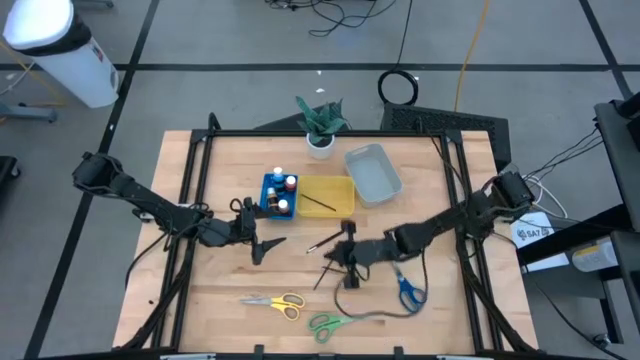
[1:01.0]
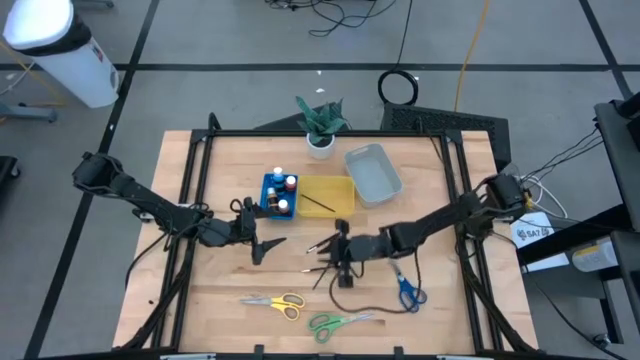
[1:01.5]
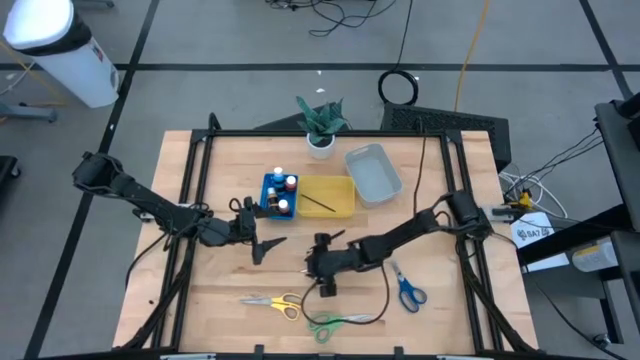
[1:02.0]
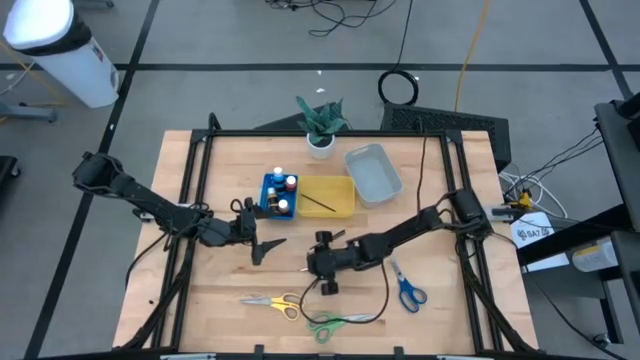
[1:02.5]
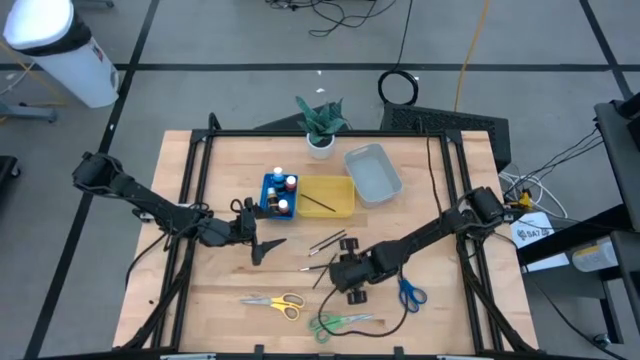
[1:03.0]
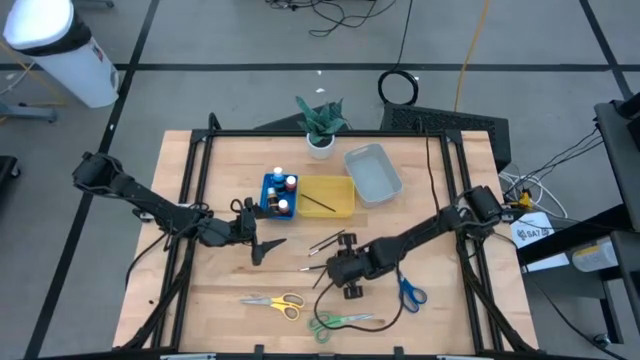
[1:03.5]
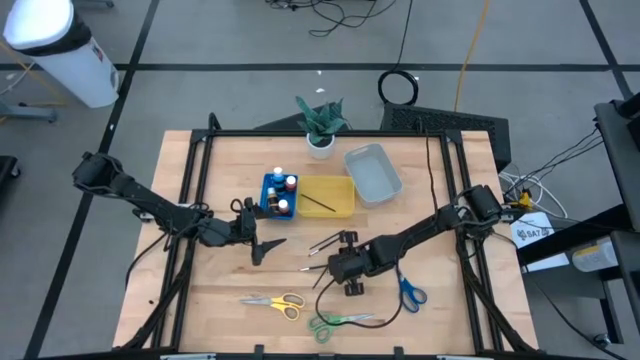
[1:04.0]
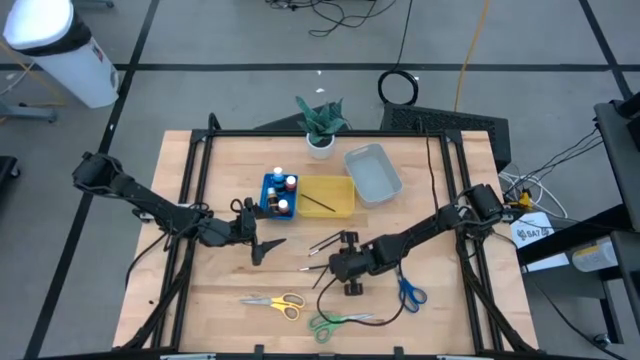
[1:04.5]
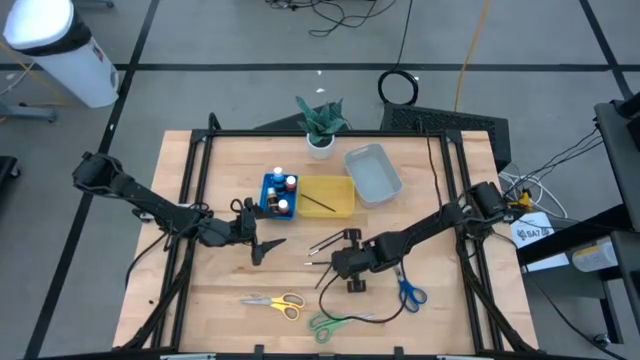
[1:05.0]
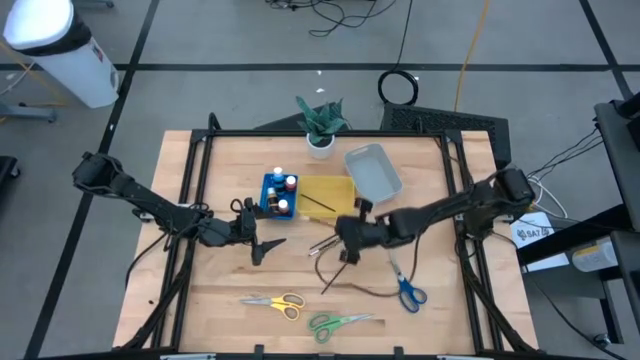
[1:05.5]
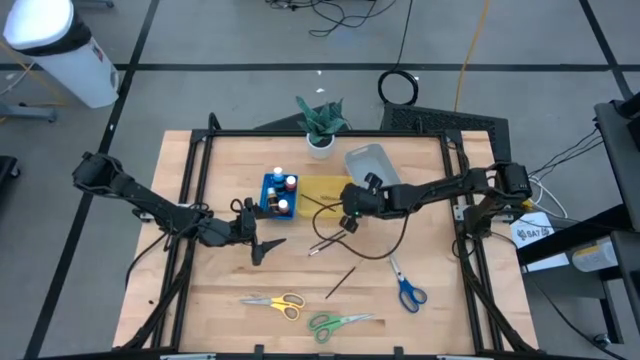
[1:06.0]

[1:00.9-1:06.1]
Task: Pick & Place Paint Supplies
Put the black makeup brush into the yellow bin

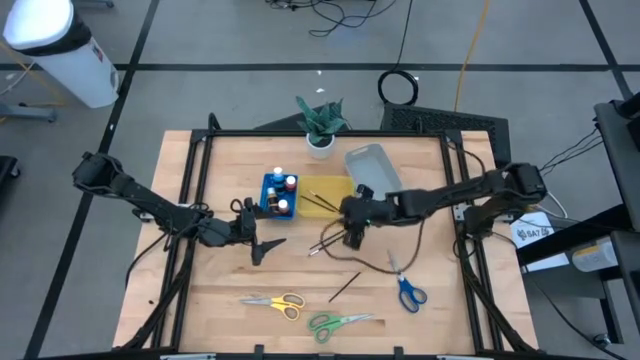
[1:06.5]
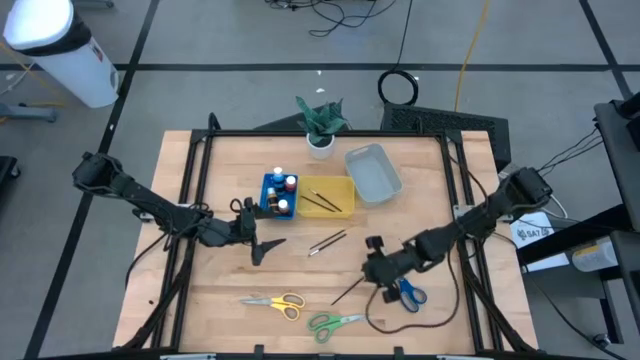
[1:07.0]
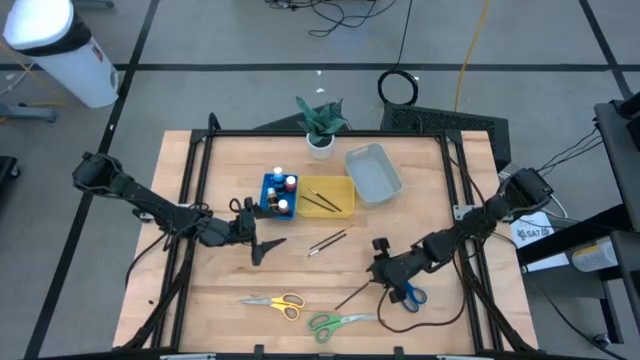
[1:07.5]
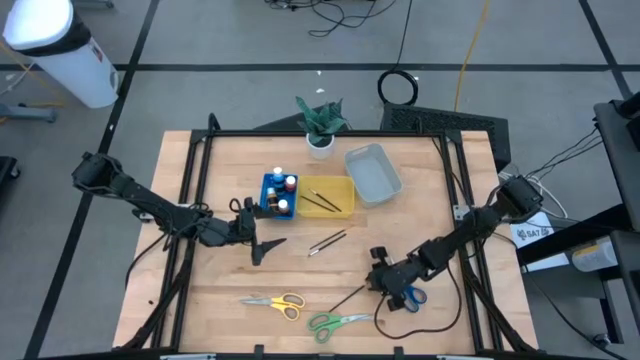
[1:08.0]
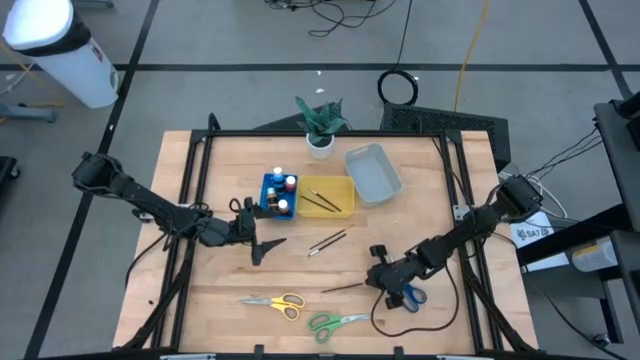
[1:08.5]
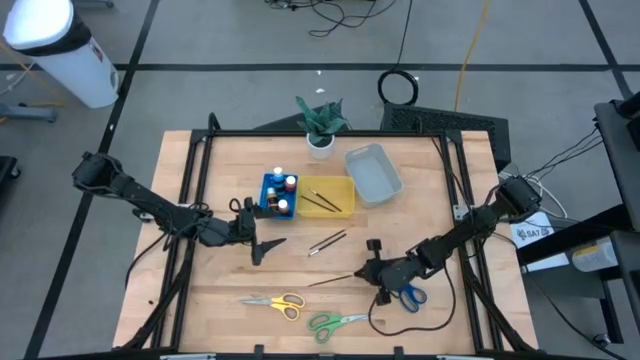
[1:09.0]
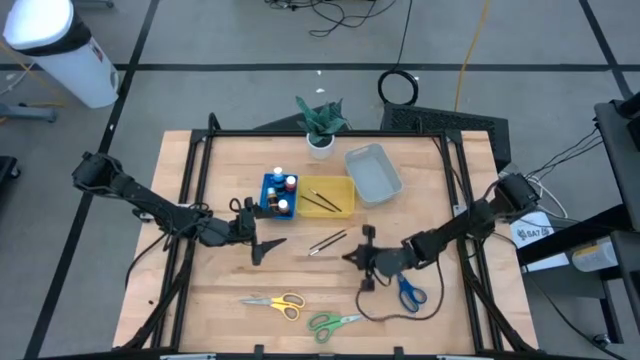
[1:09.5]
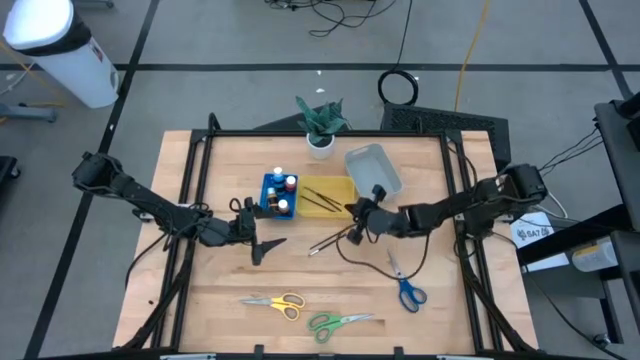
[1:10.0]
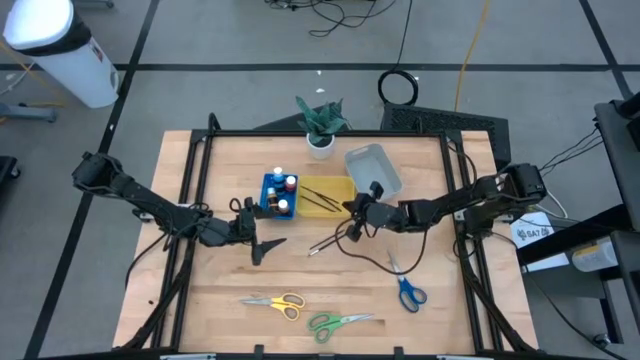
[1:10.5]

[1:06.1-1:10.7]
Put the bottom black paint brush into the yellow bin

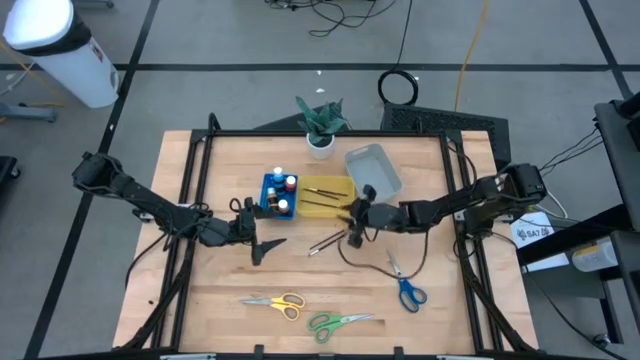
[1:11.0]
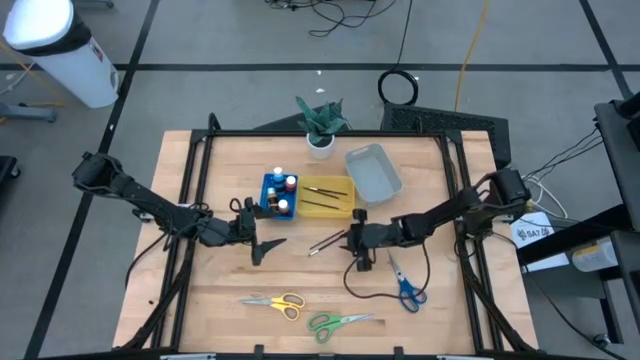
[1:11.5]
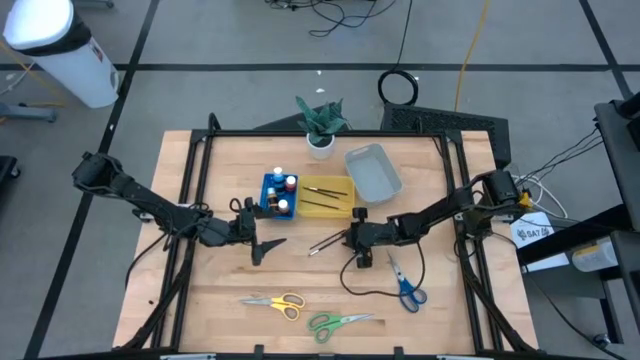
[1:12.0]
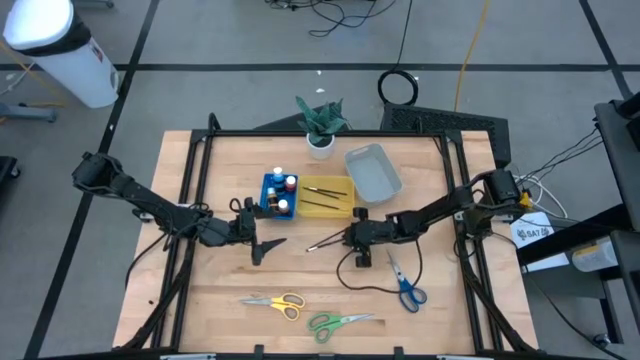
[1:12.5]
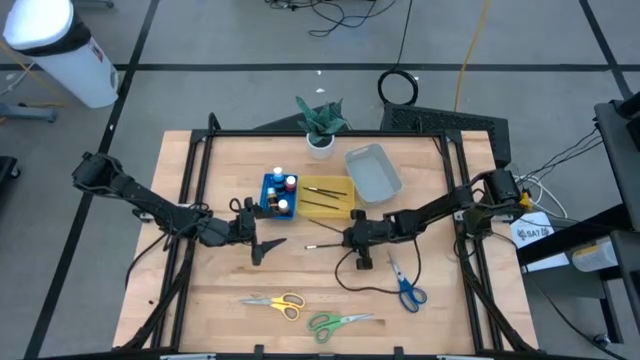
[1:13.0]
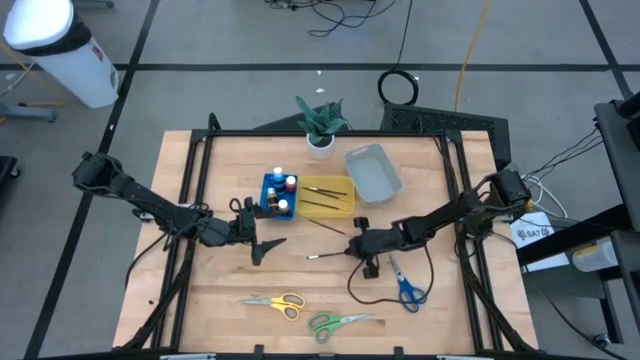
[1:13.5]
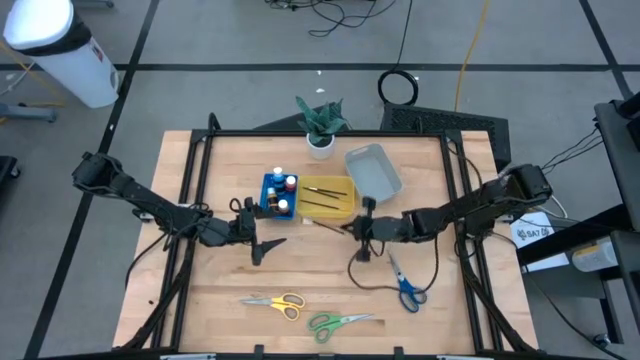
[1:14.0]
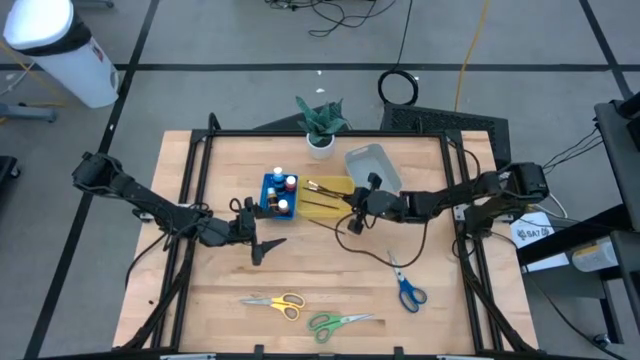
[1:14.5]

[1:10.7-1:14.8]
Put the black makeup brush into the yellow bin

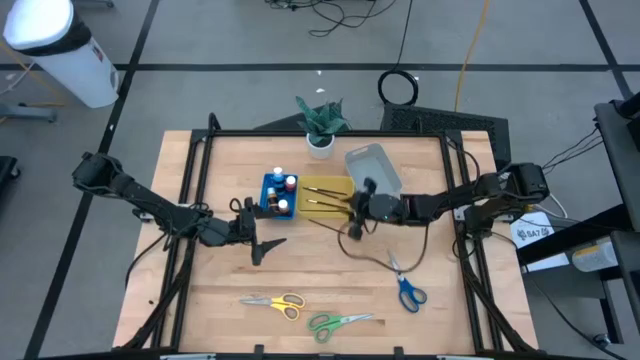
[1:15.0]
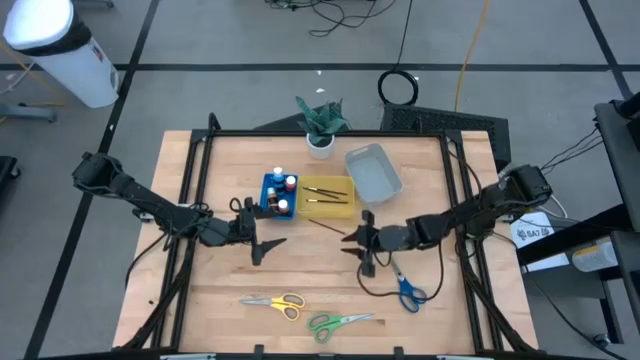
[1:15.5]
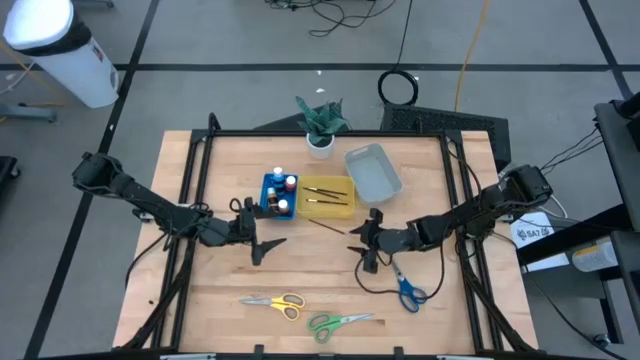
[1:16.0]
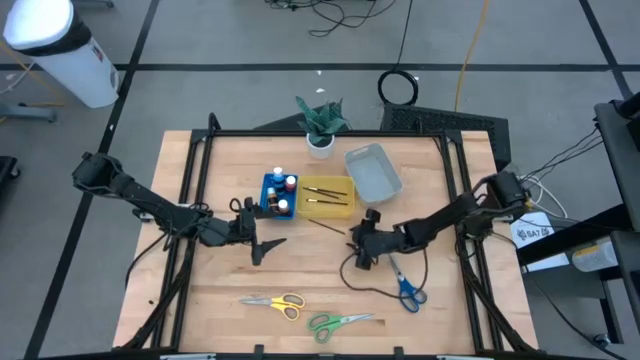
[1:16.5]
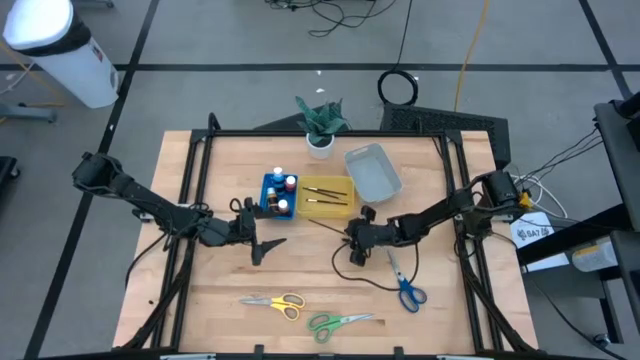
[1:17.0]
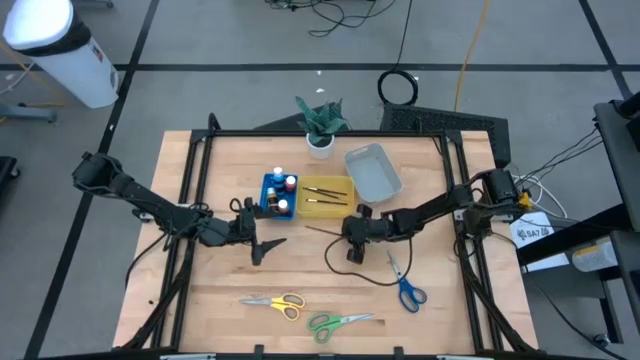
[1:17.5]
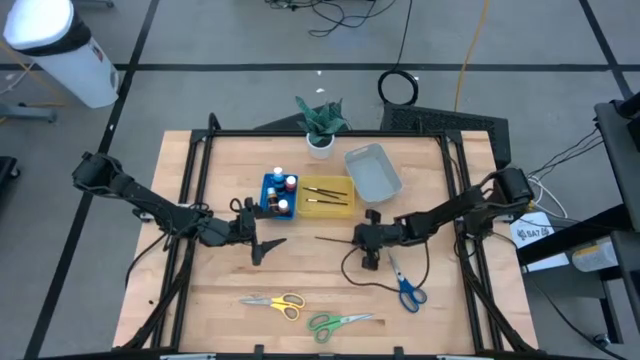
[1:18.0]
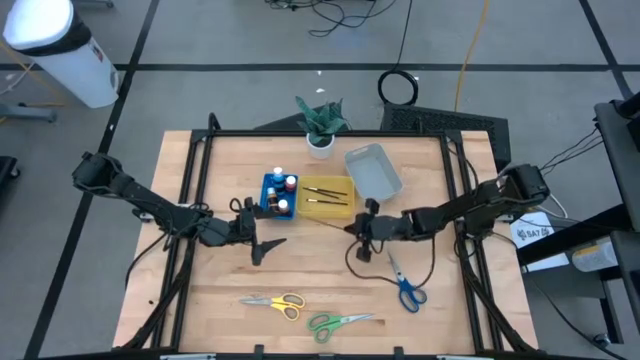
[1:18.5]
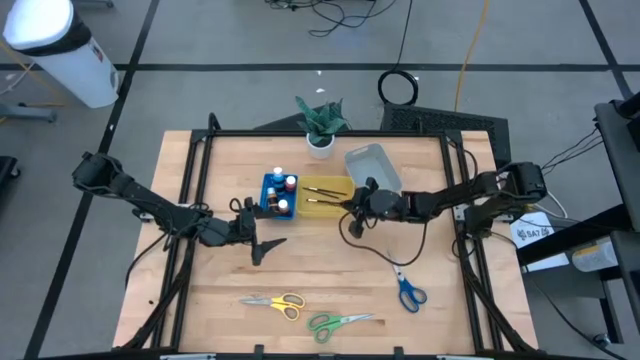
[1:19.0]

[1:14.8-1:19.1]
Put the black paint brush into the yellow bin

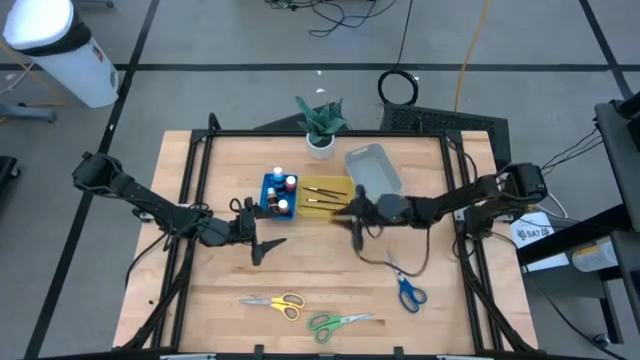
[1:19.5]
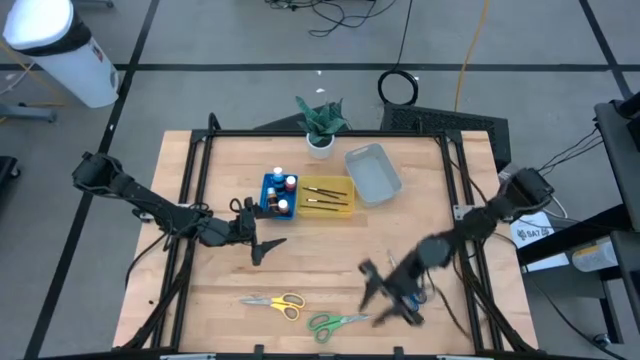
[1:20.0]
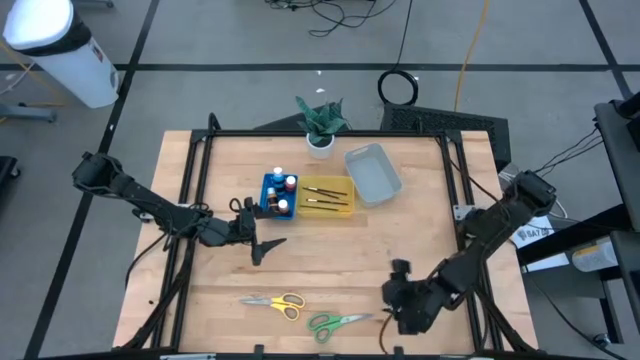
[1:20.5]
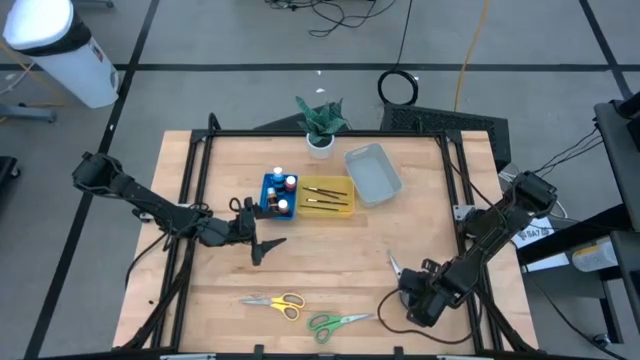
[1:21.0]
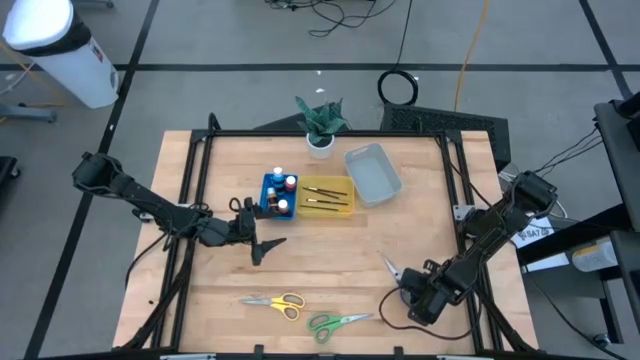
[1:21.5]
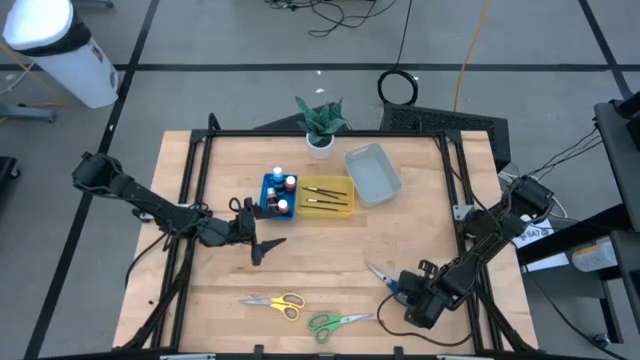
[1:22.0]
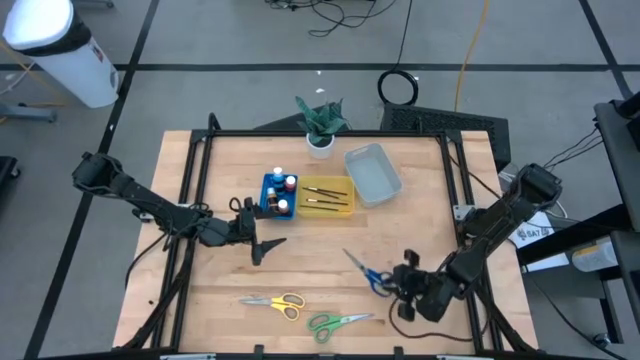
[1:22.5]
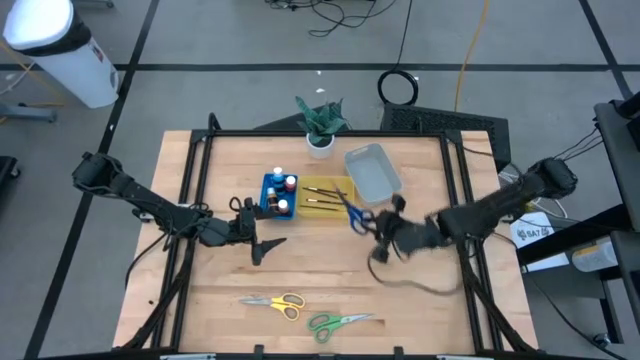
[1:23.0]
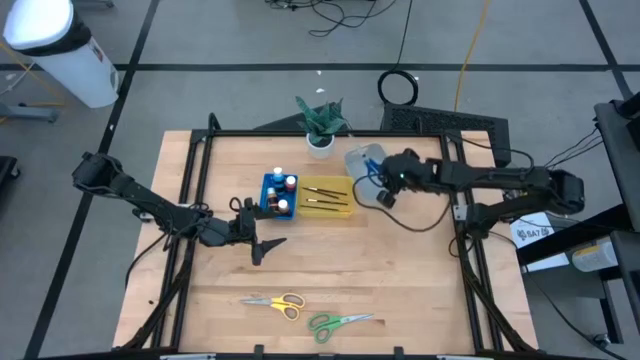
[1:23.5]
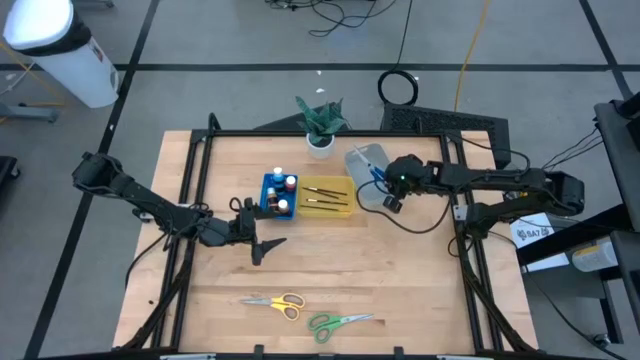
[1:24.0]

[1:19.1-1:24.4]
Put the blue scissor into the gray bin
